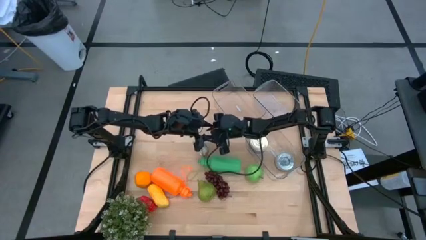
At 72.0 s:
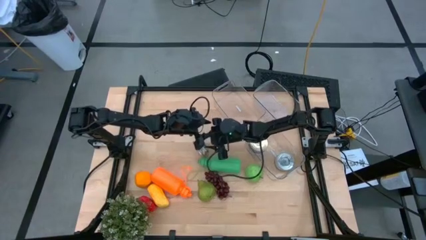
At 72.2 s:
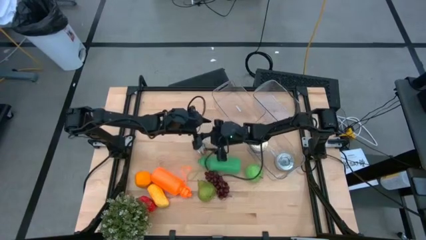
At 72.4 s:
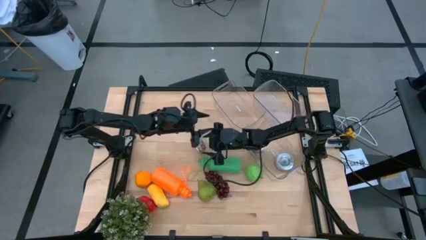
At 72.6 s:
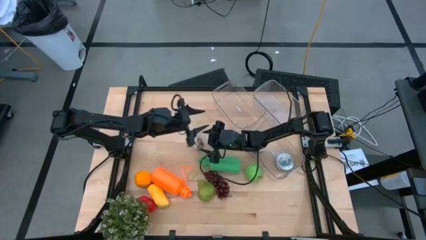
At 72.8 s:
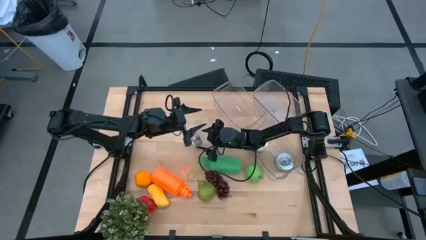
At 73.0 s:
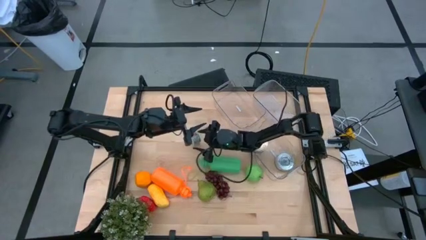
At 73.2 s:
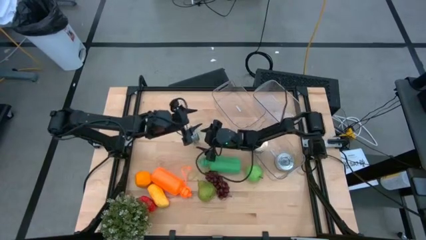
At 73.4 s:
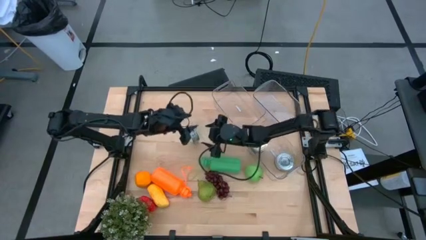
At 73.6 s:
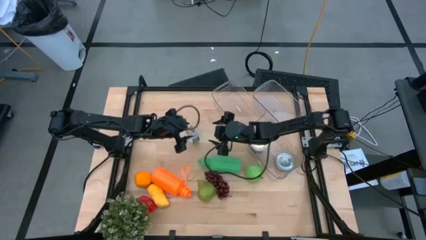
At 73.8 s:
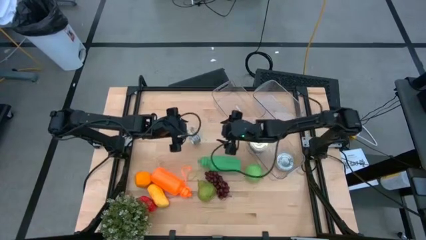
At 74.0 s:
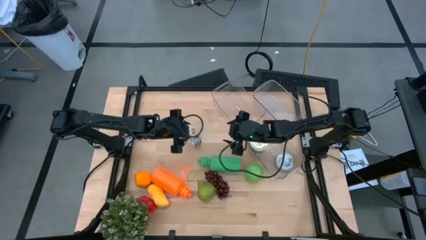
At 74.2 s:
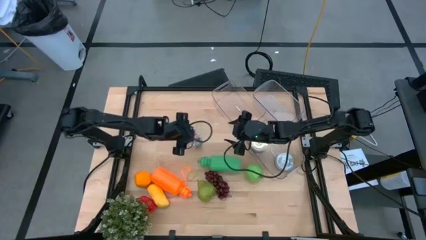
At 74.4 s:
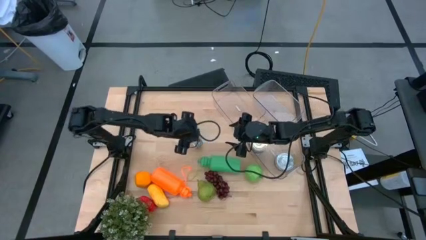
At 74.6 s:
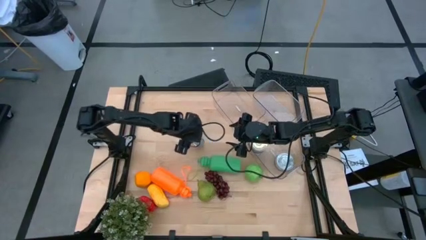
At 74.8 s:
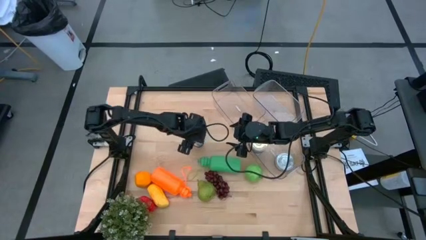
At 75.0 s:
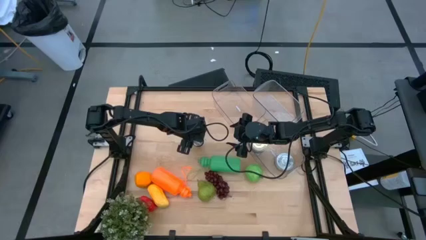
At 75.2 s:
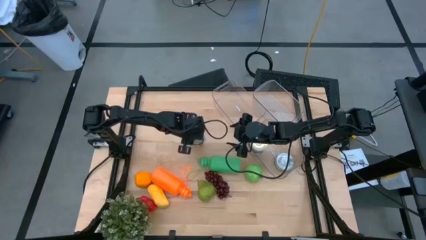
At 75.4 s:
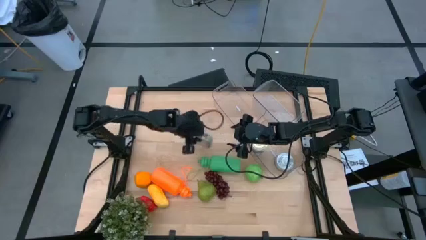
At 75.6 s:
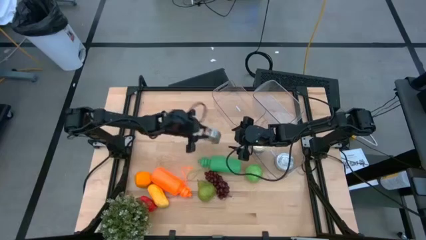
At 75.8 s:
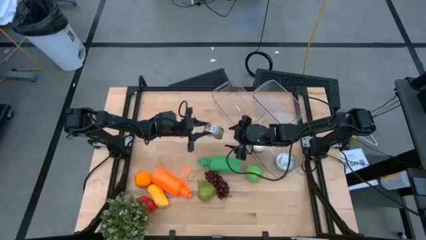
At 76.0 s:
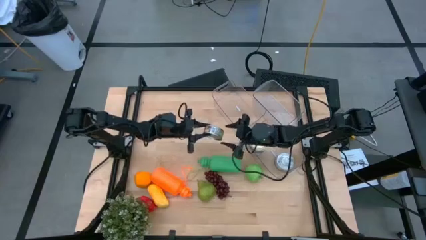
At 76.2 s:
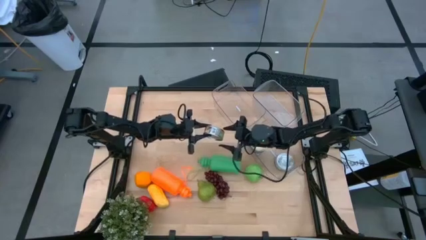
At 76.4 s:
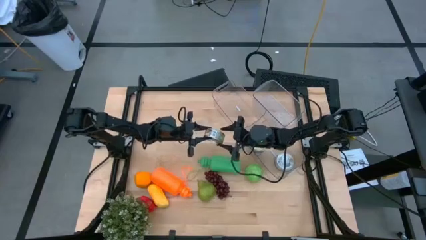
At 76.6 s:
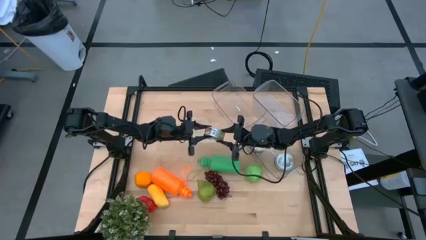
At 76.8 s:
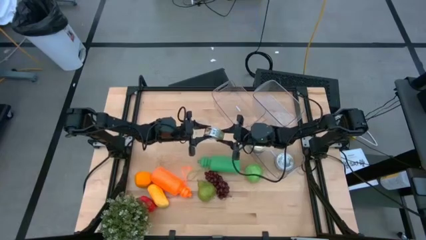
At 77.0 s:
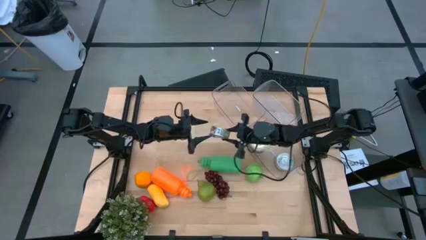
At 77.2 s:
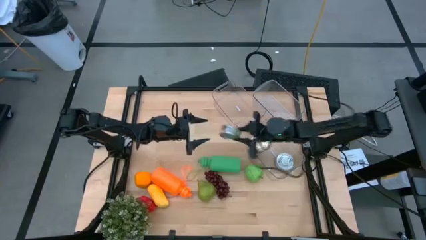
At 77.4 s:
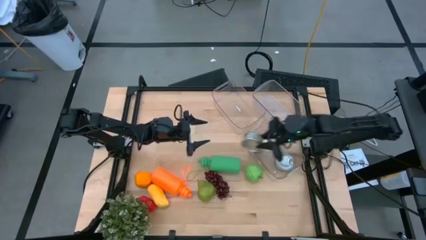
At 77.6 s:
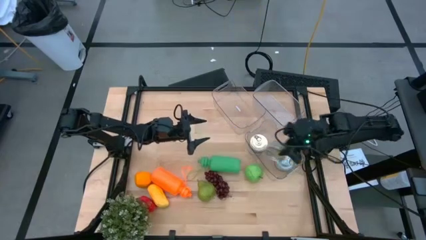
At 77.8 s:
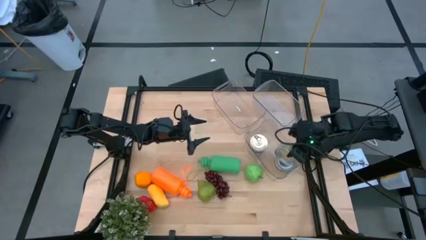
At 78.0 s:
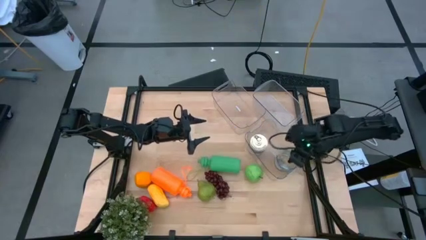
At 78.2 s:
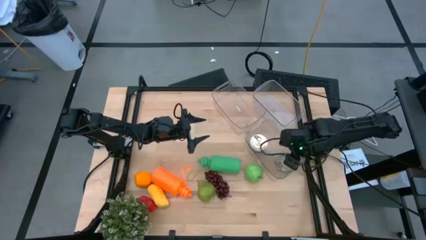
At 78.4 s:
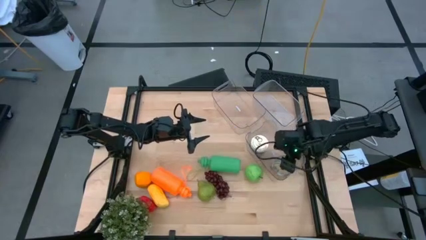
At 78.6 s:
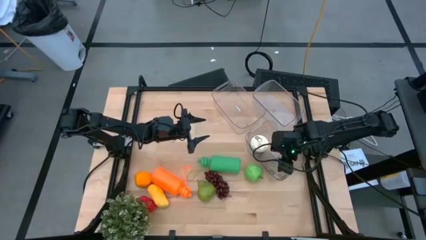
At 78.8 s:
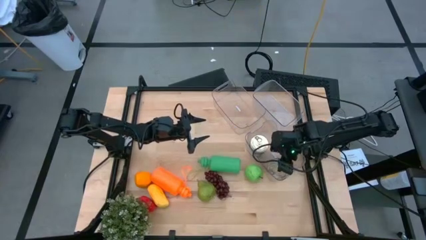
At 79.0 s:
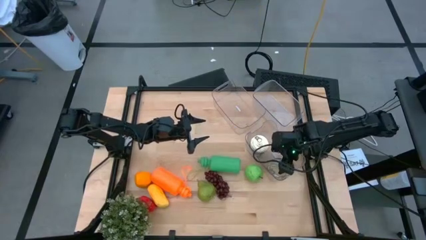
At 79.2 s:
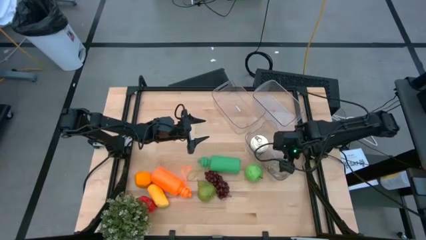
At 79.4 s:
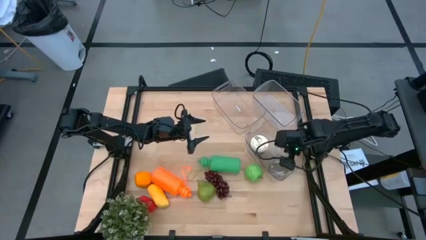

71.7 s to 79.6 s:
Task: Pick & Place Food Item
Put the green tuna can into the bottom transparent bin

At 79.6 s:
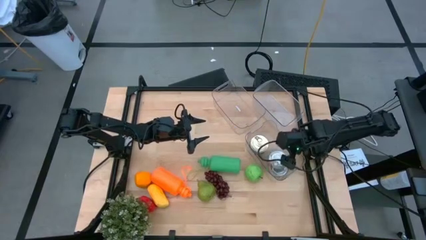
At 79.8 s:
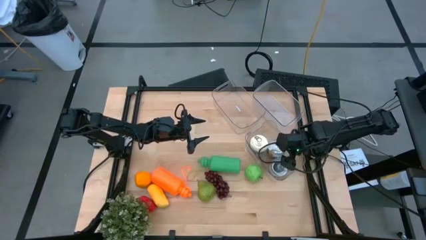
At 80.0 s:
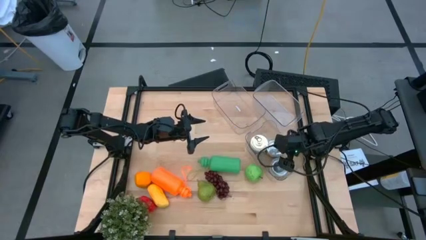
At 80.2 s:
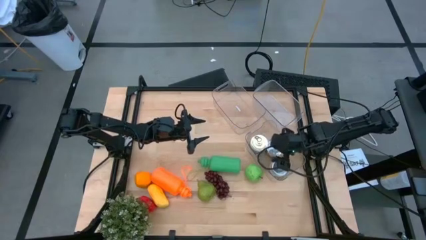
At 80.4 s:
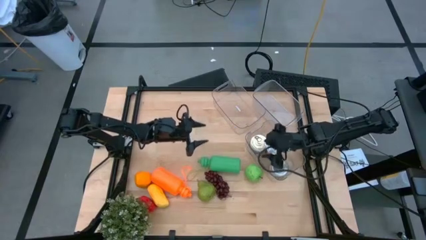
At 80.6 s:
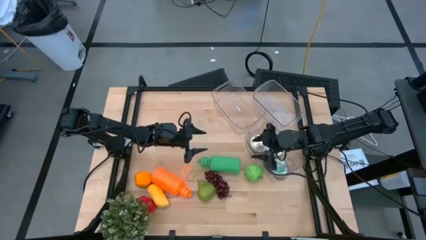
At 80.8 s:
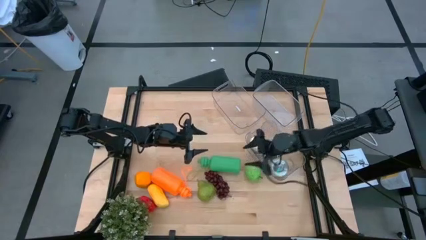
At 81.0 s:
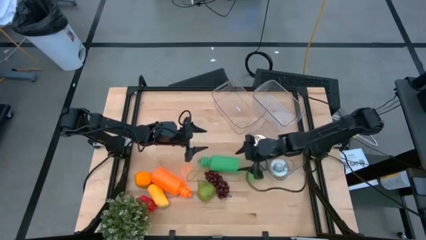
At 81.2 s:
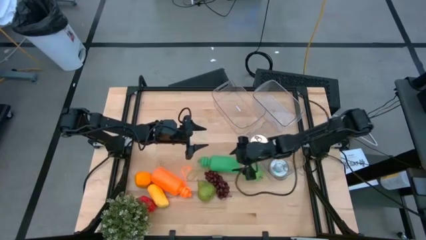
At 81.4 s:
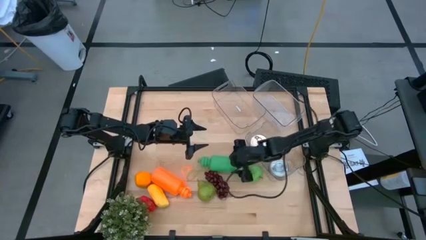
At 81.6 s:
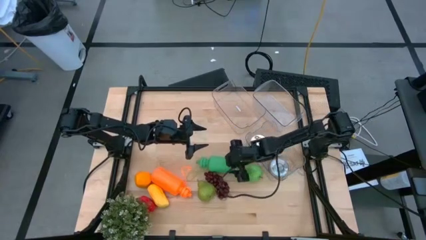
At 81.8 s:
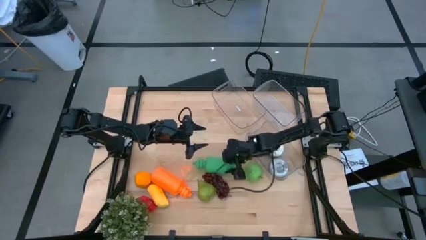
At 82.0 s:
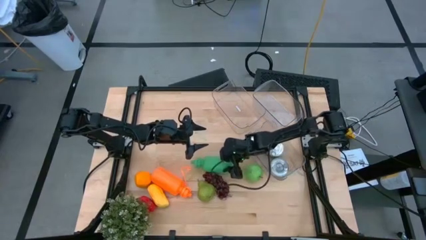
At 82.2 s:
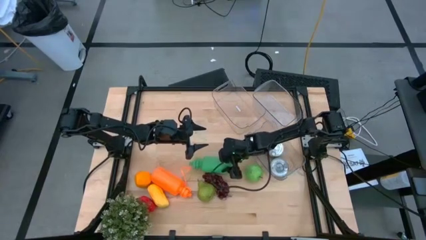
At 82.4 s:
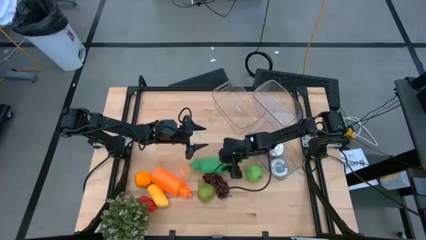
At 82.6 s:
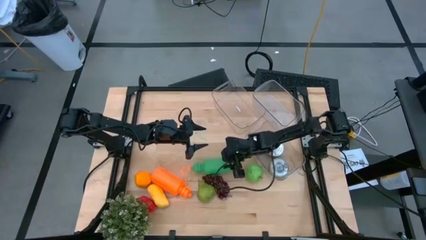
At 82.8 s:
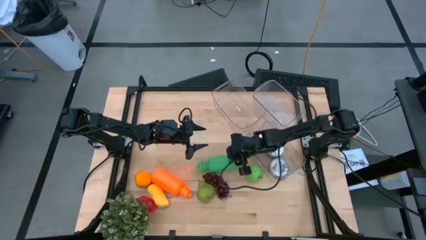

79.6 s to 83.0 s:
Put the green water bottle into the top right transparent bin
